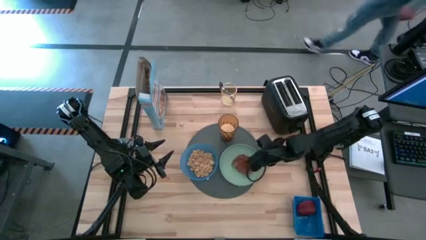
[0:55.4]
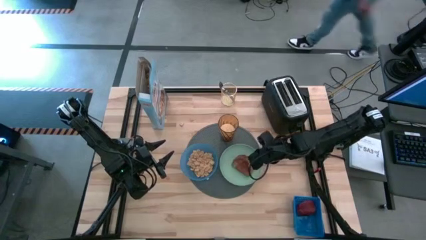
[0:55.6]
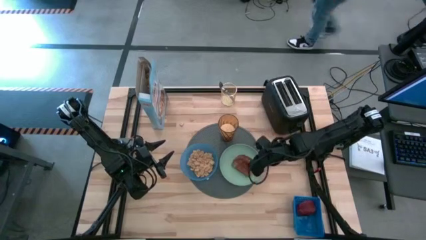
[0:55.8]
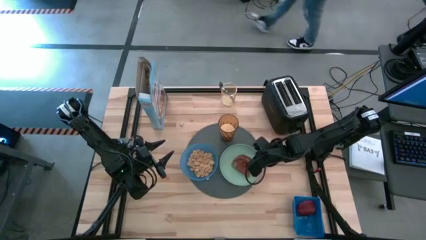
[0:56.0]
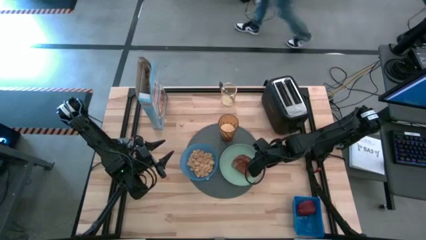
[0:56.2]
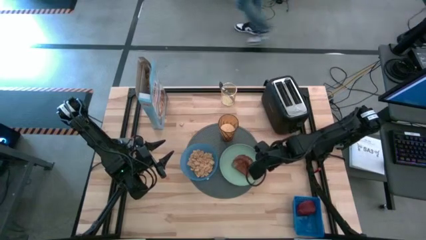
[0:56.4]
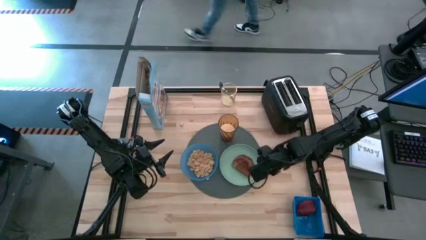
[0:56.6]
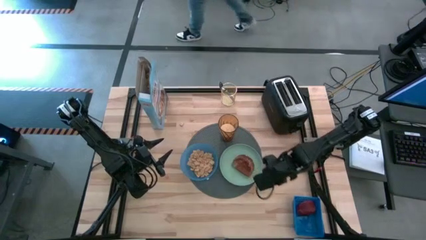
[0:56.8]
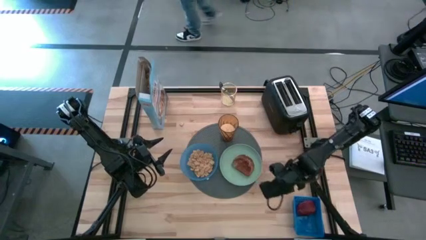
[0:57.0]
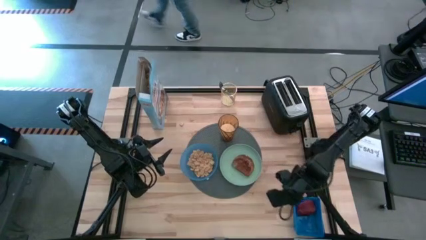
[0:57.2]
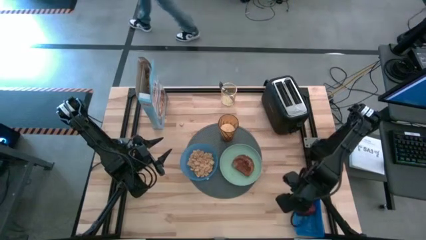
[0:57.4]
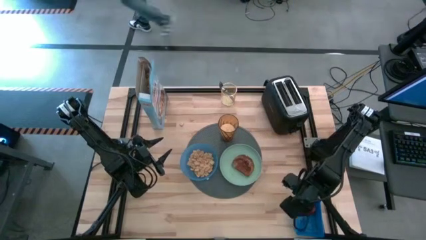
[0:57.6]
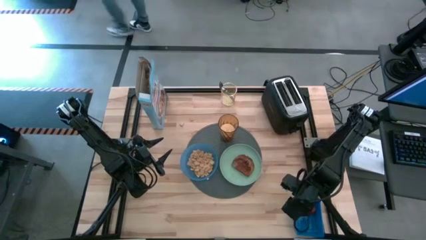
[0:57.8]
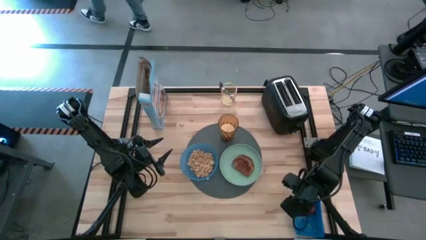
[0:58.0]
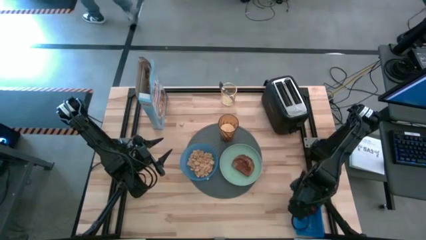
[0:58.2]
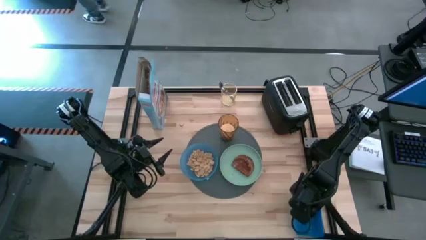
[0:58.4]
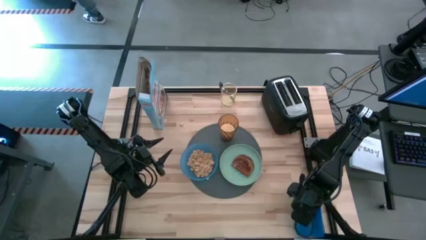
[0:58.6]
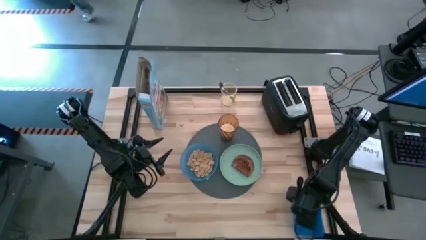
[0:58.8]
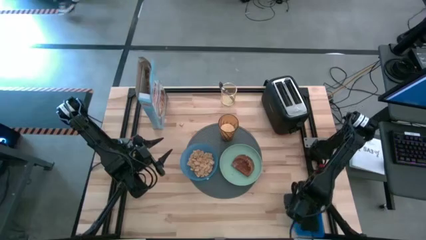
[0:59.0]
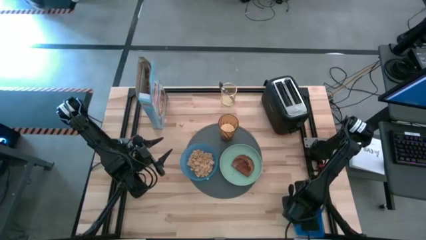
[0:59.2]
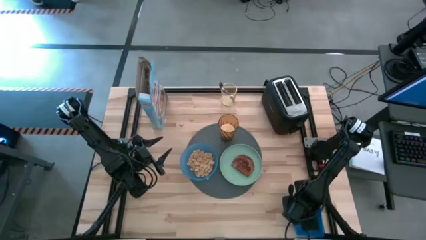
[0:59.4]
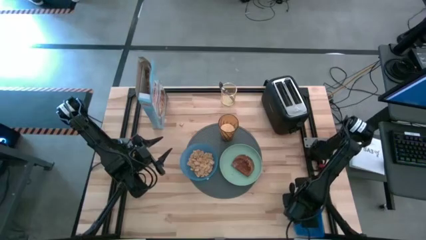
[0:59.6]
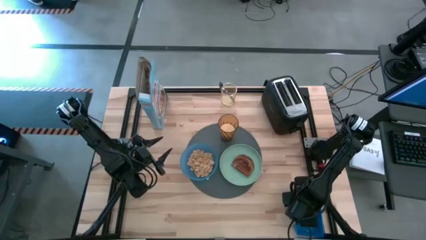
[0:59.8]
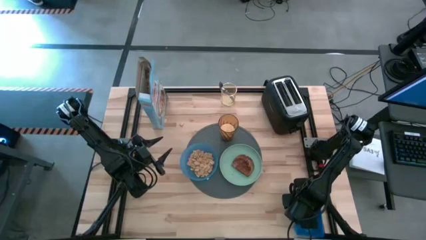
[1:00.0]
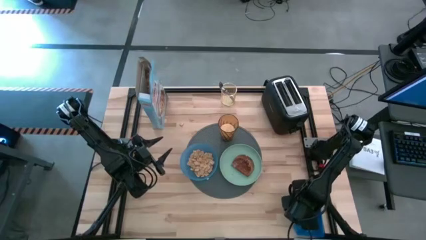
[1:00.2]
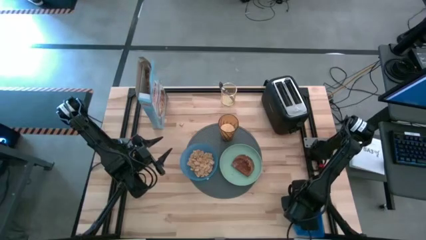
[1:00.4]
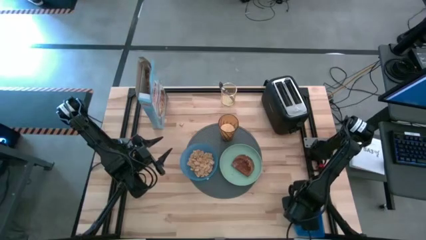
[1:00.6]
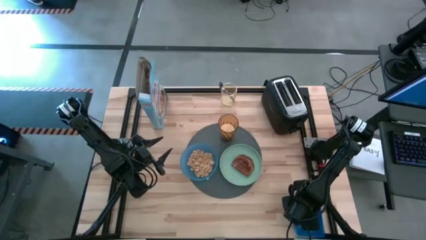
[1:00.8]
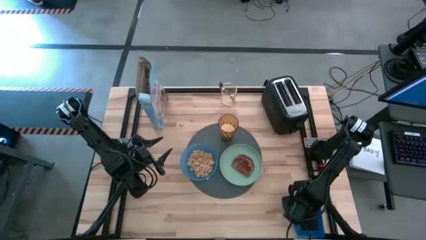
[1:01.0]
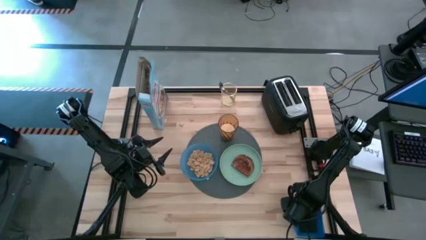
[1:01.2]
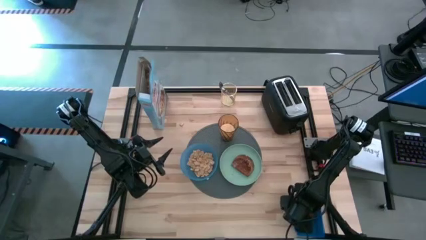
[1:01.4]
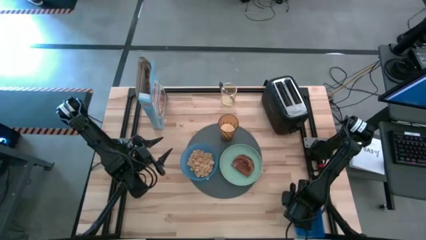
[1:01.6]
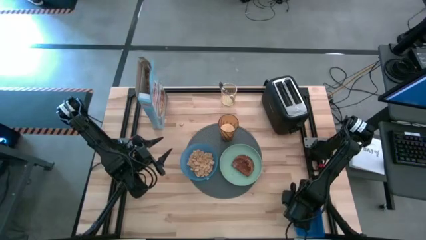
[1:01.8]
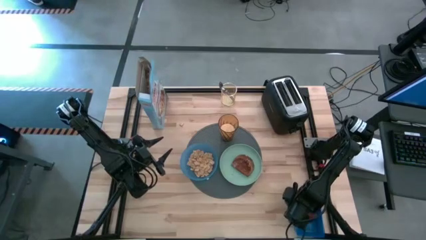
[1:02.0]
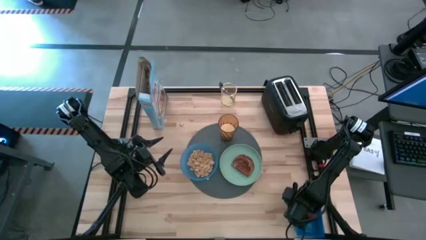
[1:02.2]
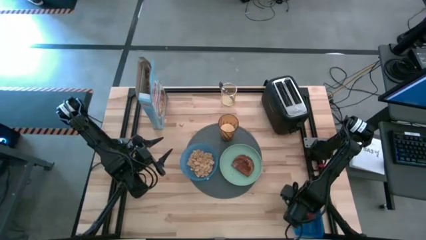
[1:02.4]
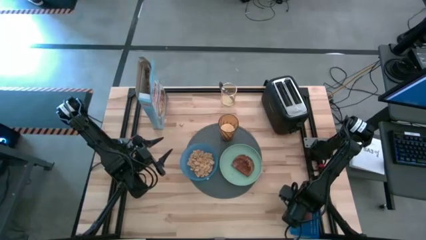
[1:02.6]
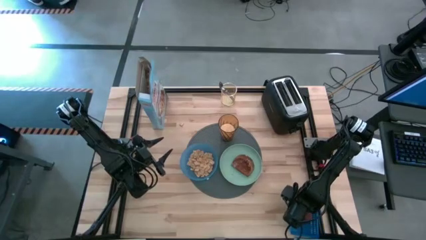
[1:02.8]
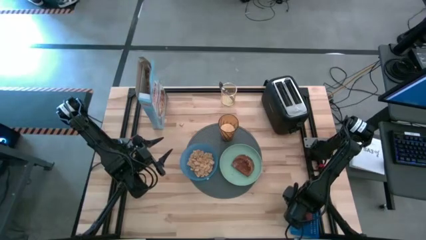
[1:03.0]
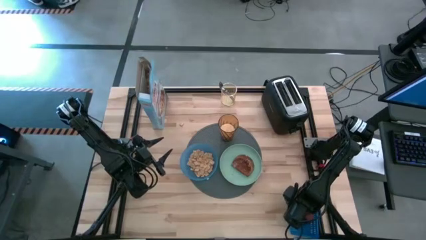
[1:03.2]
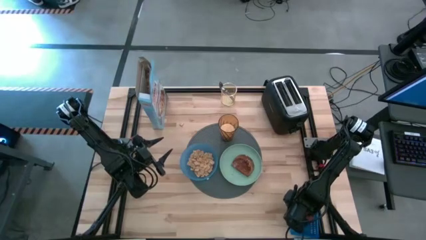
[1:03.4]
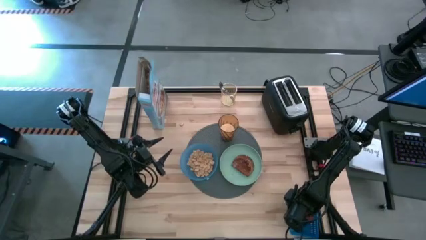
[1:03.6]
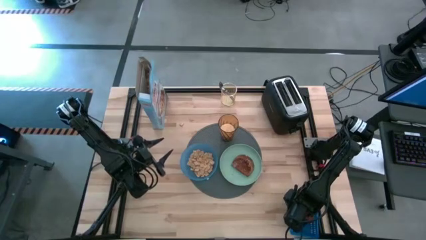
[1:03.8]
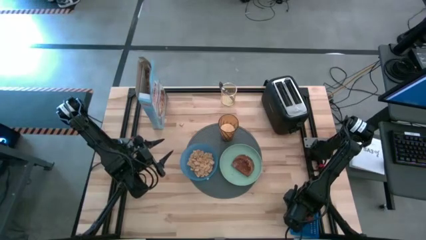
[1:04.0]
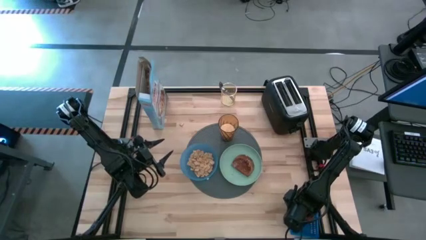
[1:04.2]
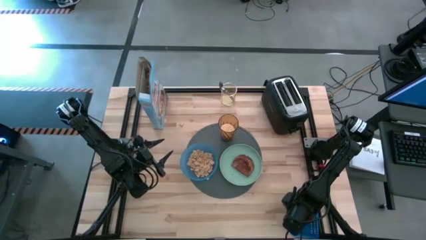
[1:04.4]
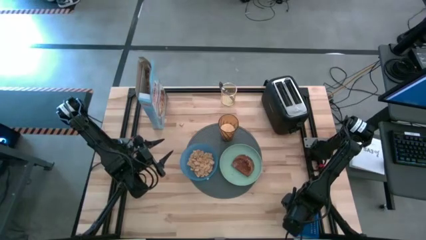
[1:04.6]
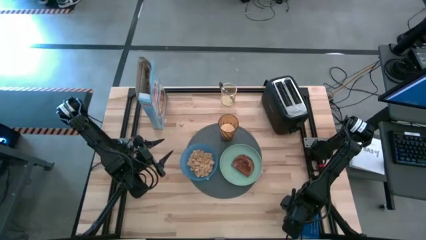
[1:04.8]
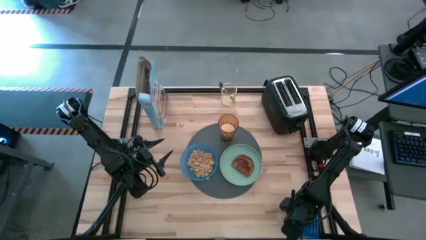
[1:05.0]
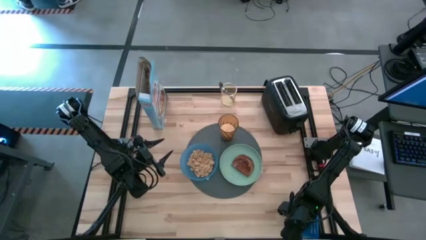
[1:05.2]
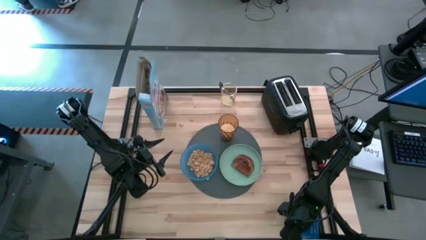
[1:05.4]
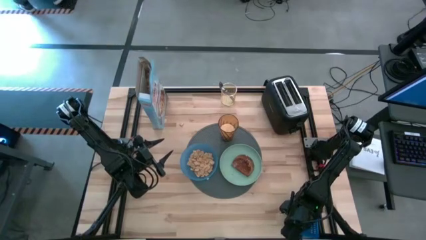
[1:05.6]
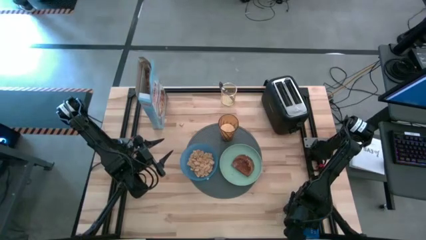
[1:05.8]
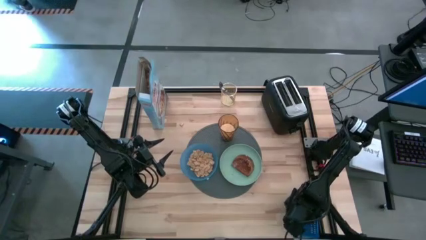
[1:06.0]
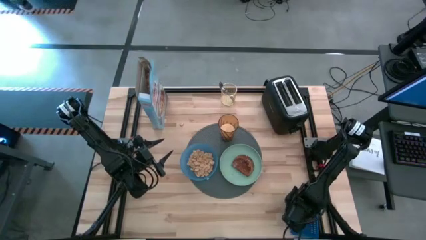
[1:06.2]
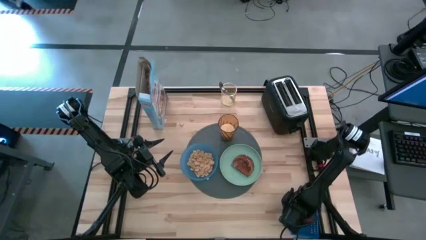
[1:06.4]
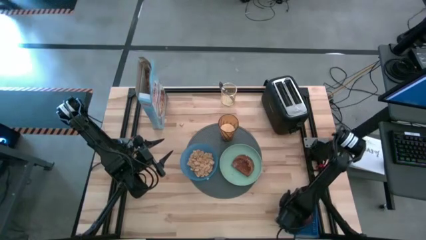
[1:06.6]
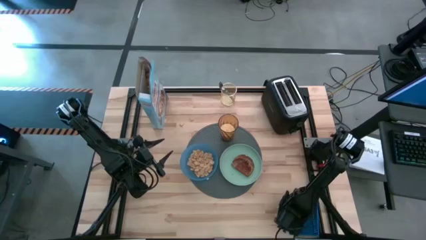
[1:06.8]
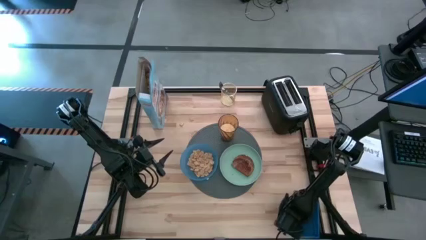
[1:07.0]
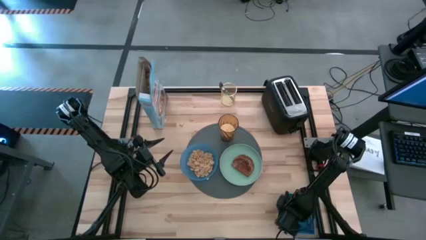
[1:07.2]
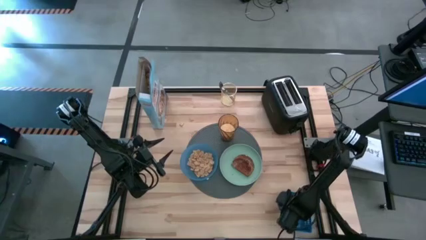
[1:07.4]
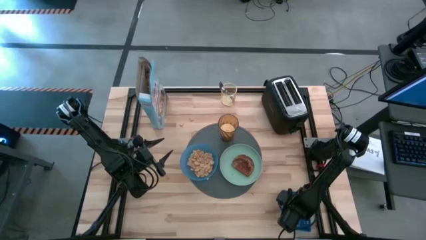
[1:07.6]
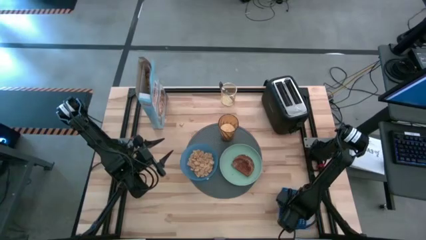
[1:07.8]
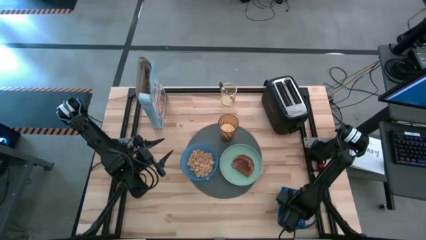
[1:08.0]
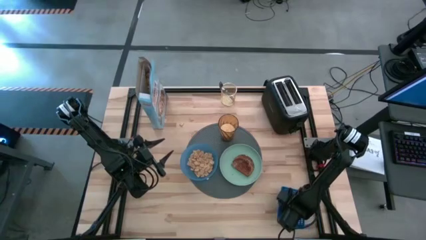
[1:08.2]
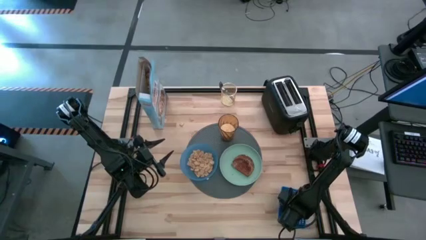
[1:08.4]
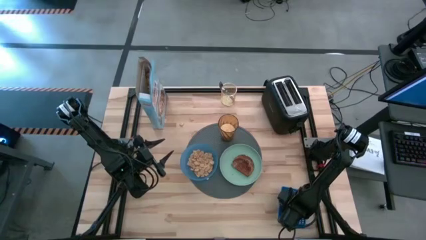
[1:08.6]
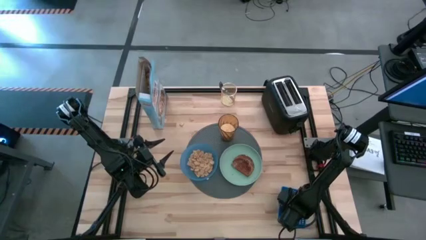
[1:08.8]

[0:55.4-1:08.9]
Task: Arrange a breakfast setting
Put the red apple on the light green plate
